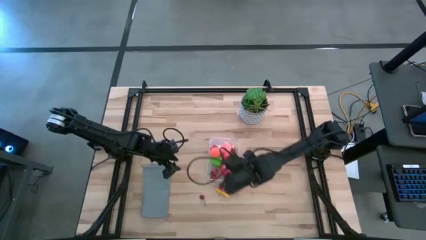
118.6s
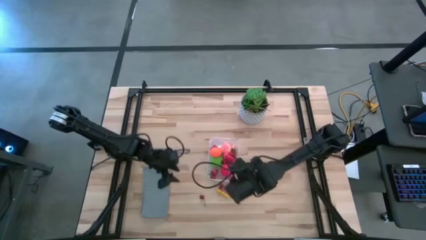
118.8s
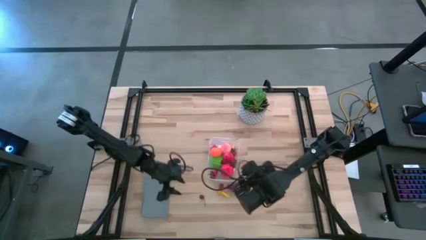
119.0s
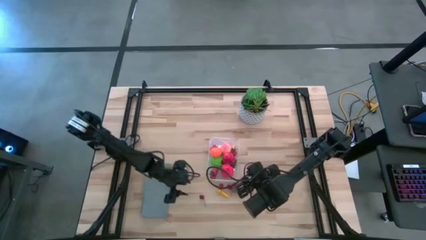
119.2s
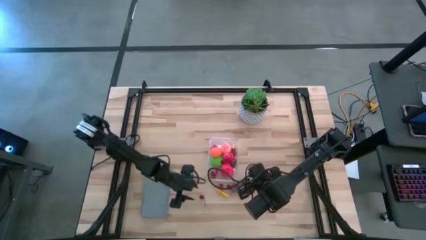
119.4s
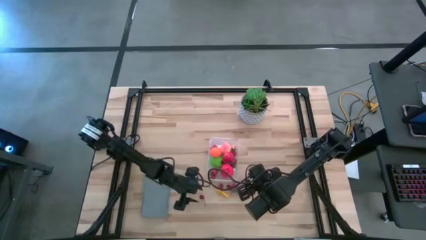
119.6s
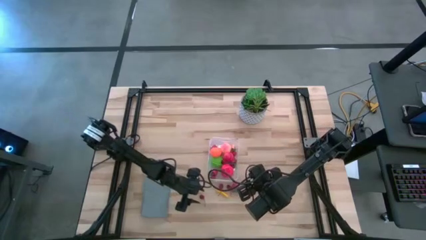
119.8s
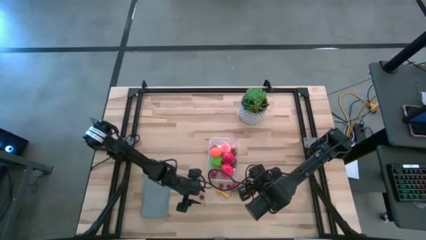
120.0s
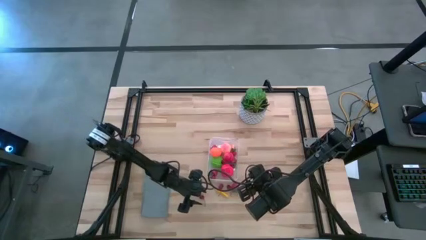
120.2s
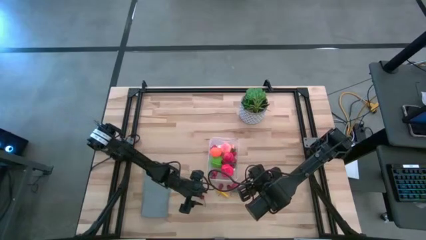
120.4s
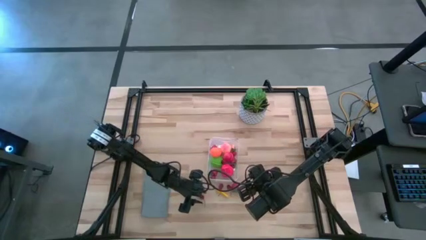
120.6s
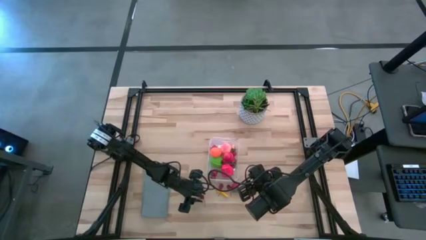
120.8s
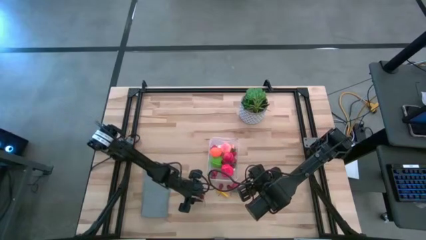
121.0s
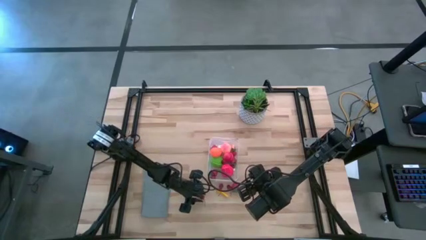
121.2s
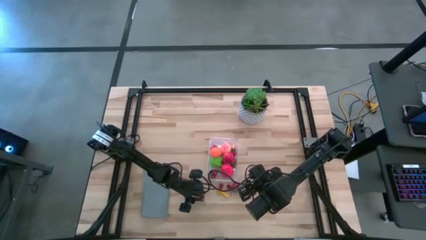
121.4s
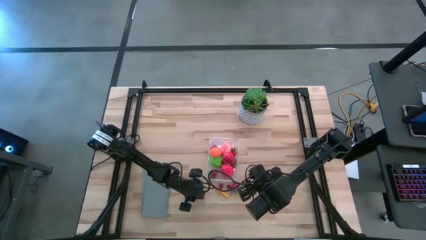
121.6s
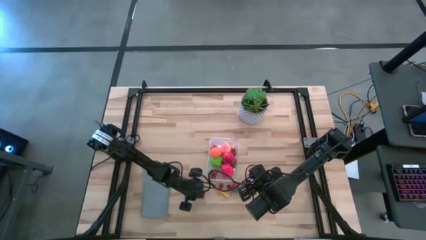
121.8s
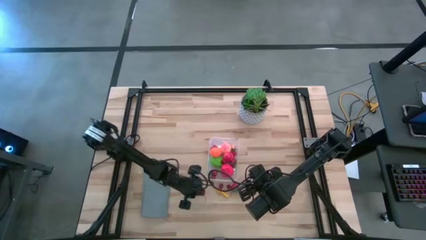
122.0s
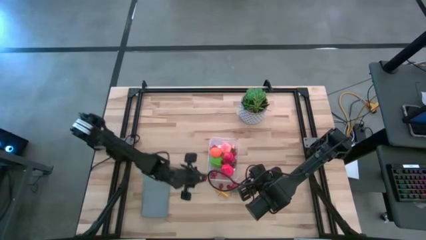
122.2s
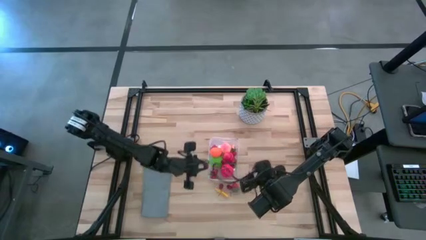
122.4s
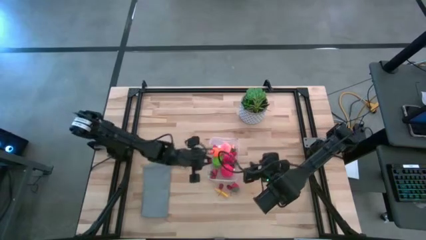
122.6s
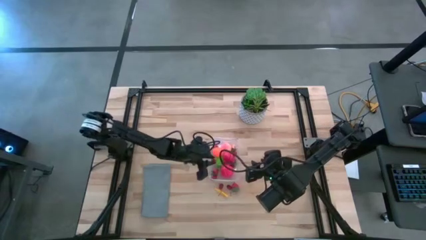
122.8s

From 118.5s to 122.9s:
Task: Pick and placing Produce into tupperware
Put the red cherry into the transparent bin

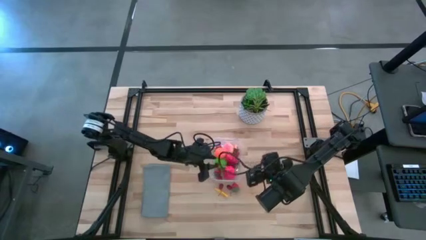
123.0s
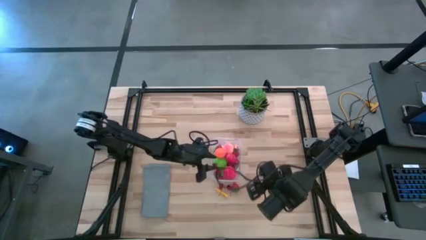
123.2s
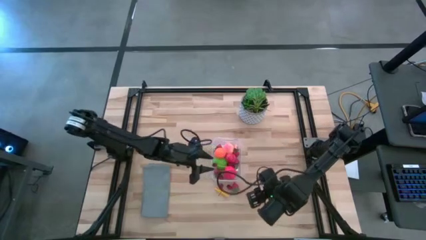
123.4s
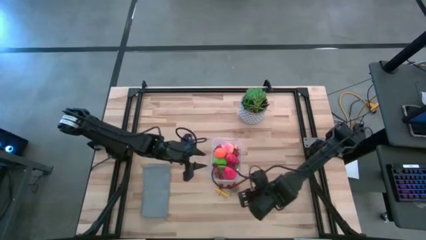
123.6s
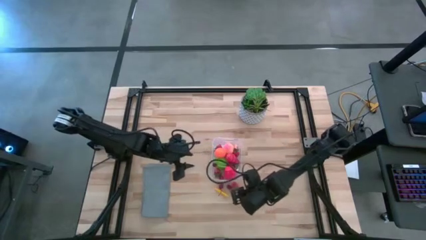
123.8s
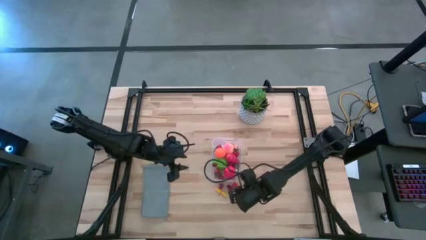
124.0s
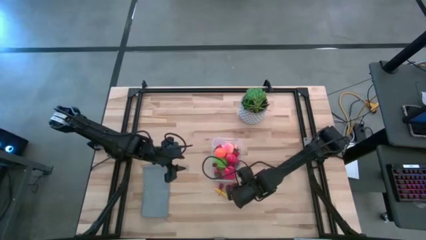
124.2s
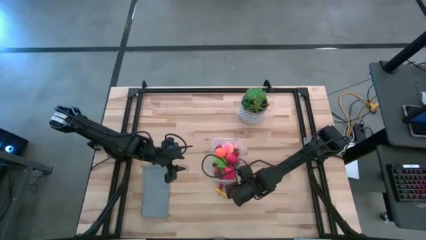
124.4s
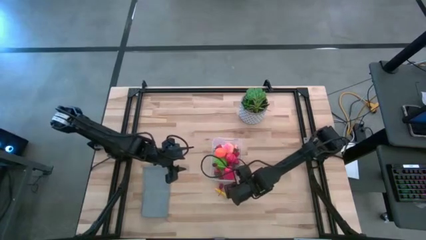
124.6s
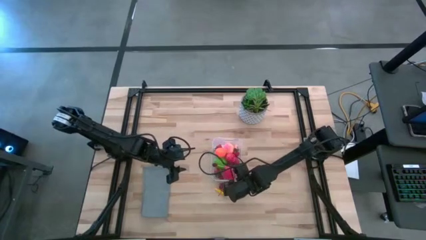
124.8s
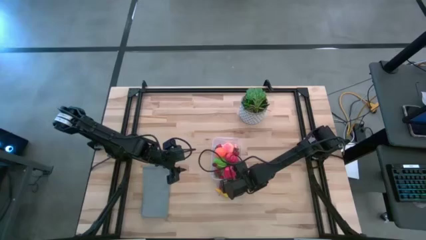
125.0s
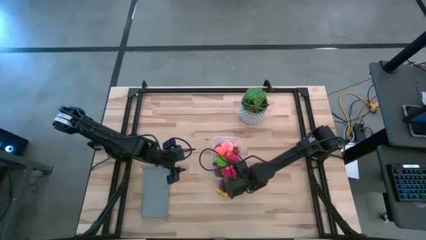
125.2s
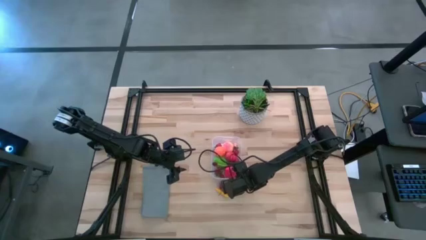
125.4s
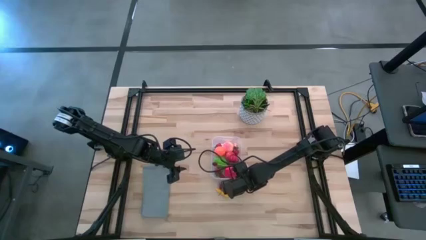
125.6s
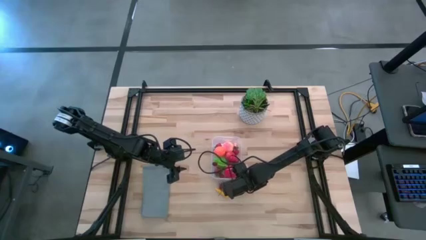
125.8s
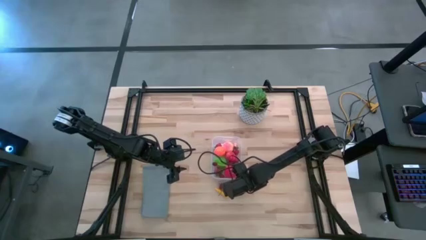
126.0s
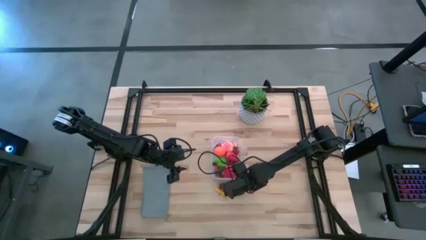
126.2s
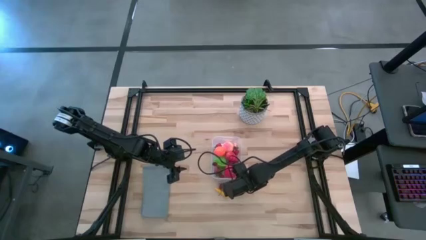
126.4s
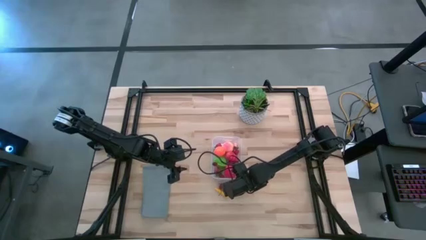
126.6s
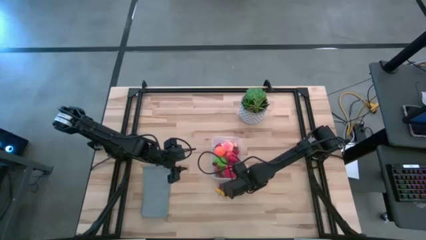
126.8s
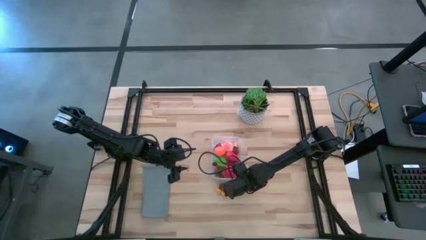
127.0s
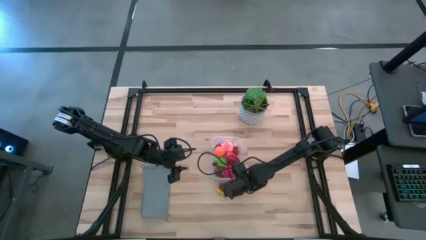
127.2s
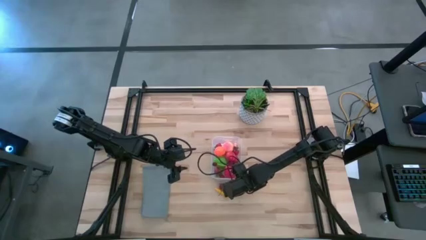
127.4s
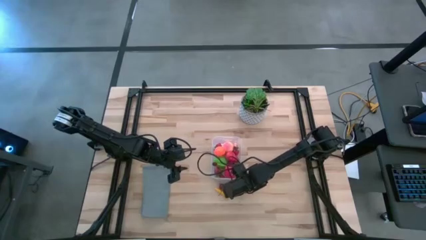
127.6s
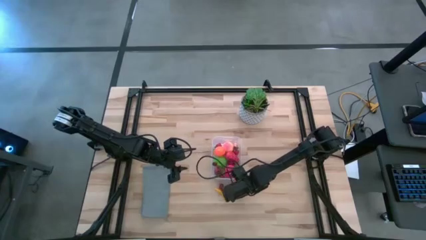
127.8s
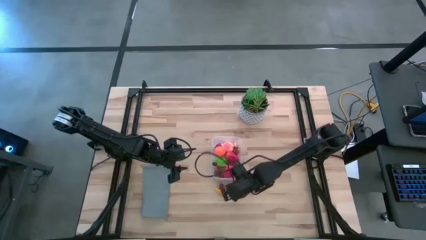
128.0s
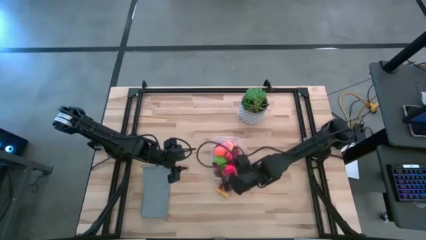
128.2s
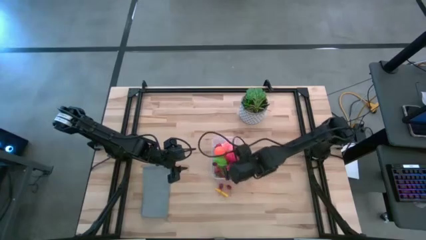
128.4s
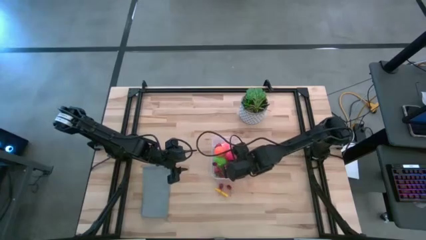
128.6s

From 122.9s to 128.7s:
Put the red strawberry into the transparent bin

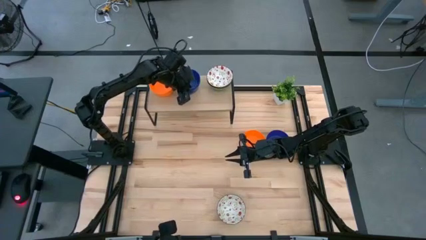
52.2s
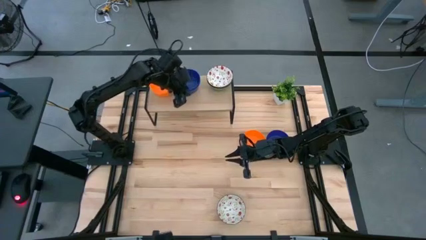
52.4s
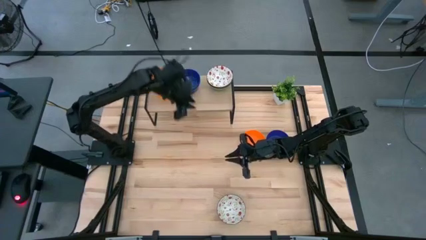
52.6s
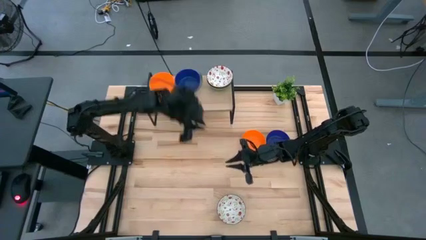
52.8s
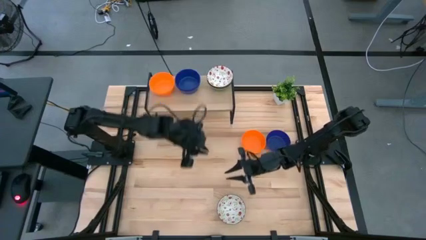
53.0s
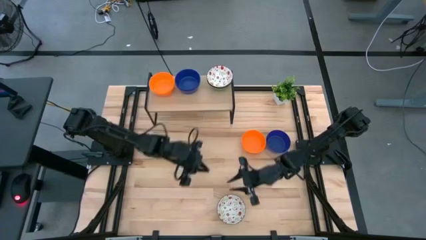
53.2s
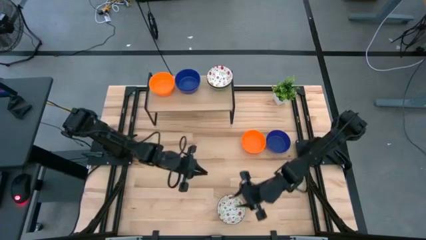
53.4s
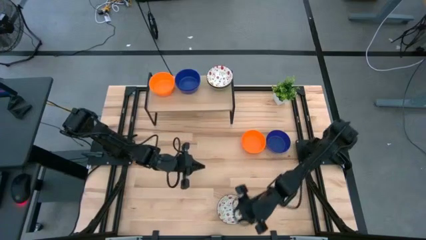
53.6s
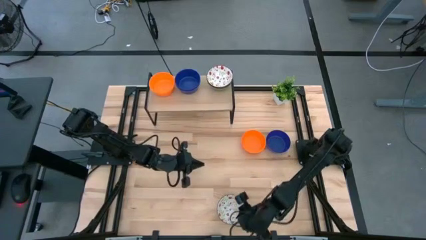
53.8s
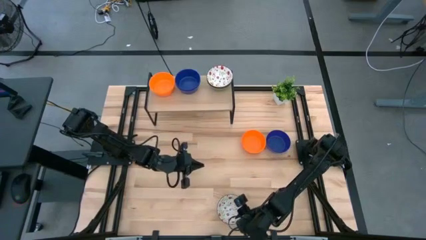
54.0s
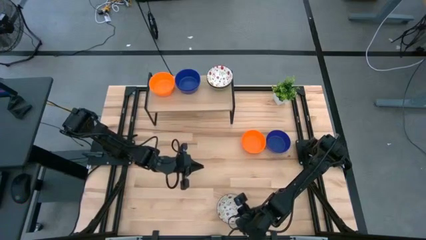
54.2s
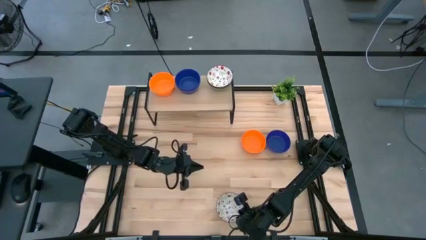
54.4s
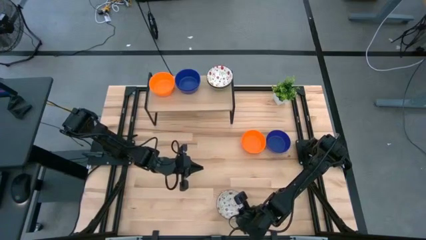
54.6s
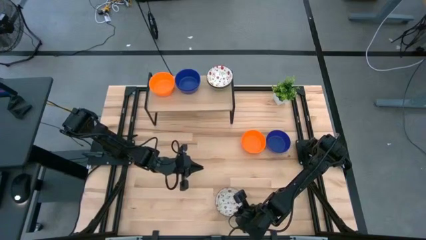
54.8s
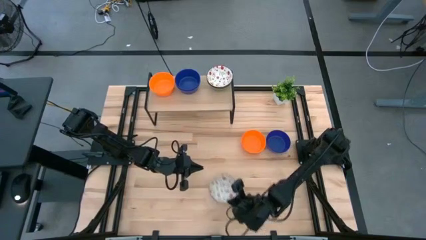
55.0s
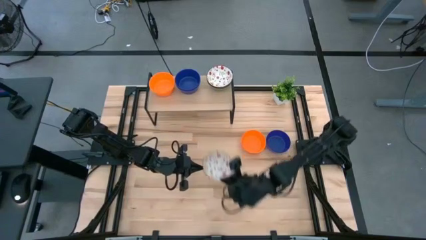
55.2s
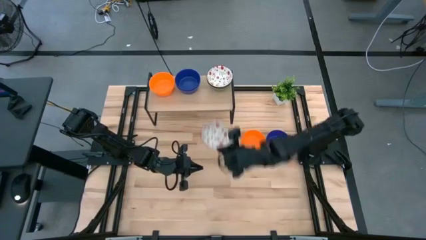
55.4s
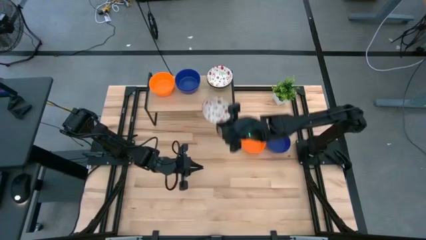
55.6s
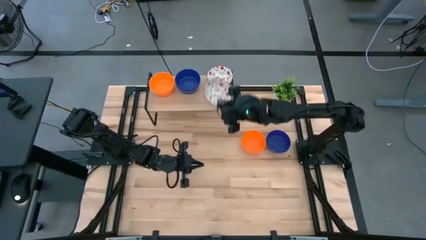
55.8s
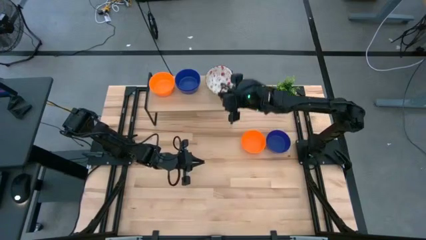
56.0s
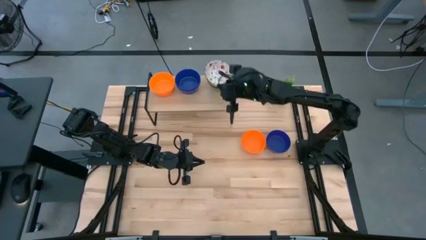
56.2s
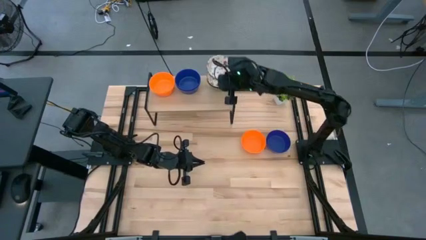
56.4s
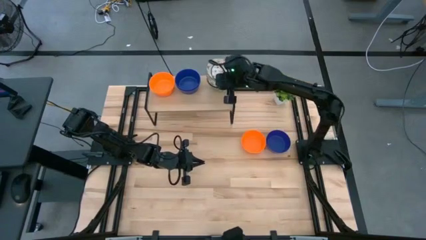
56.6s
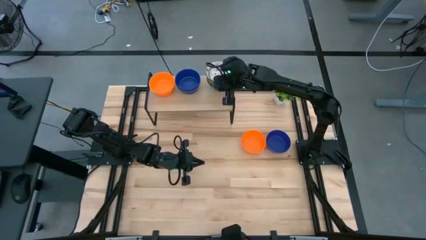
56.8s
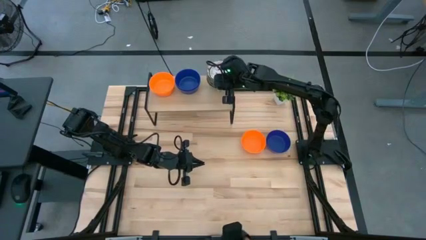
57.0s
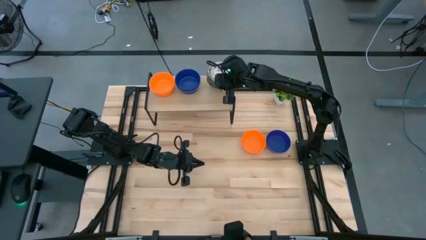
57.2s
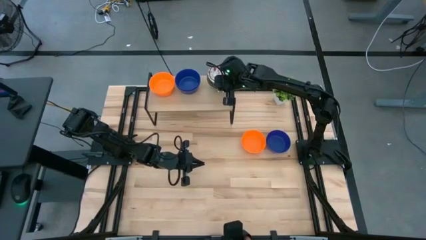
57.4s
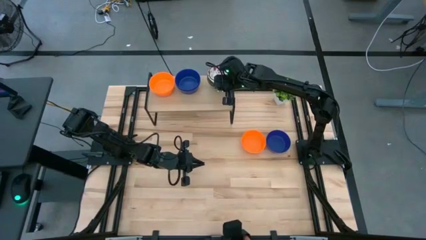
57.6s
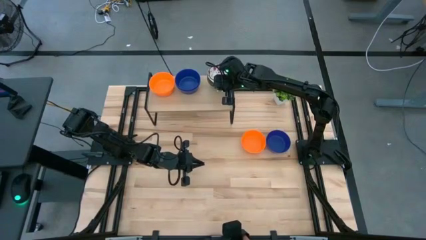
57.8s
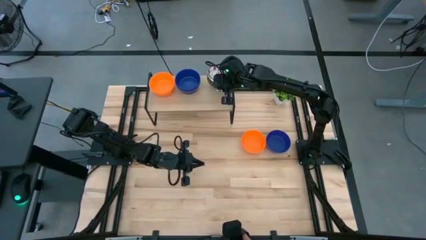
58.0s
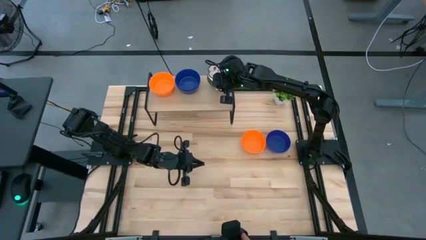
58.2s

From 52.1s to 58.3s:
Task: Pick & Place Mini bowls
Stack the white bowl on top of the other white bowls on the shelf
